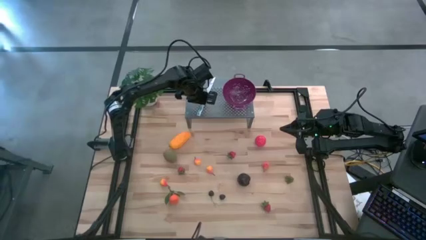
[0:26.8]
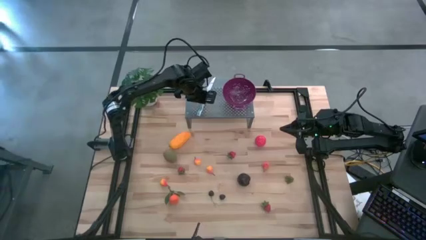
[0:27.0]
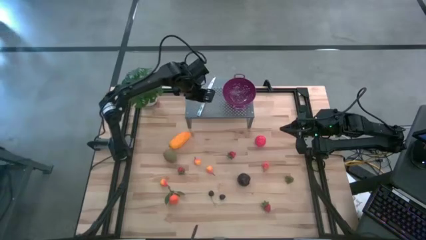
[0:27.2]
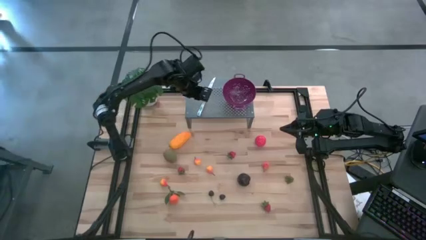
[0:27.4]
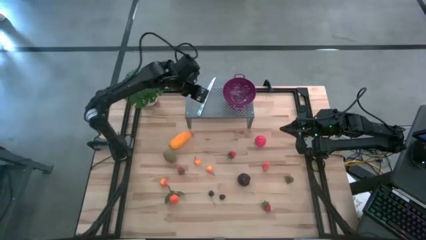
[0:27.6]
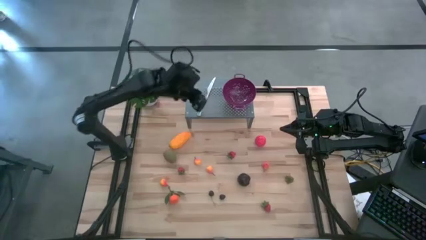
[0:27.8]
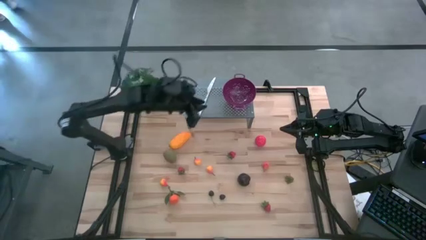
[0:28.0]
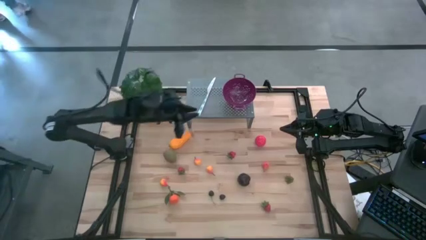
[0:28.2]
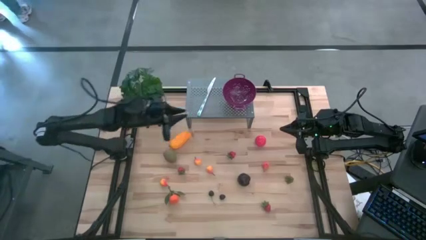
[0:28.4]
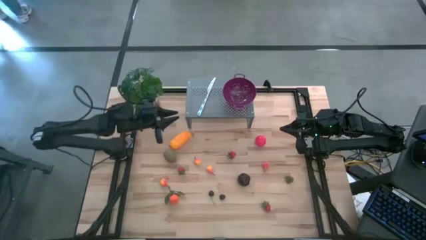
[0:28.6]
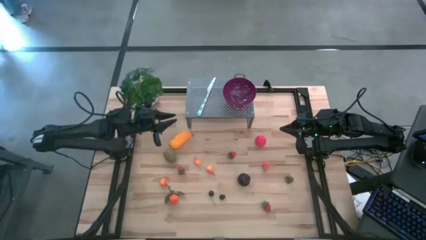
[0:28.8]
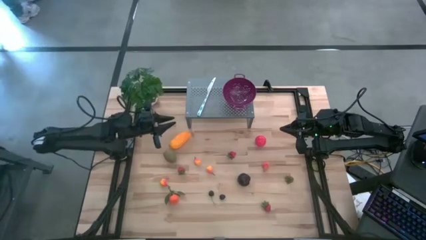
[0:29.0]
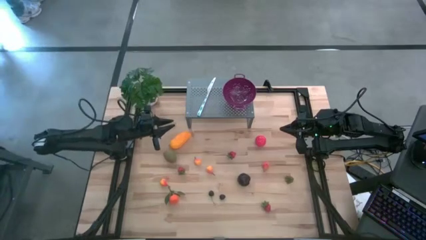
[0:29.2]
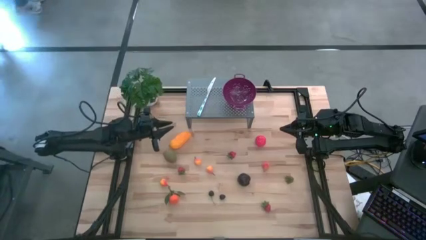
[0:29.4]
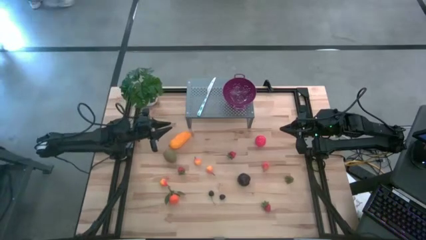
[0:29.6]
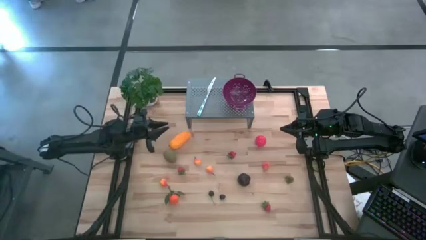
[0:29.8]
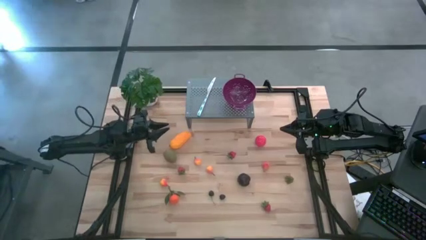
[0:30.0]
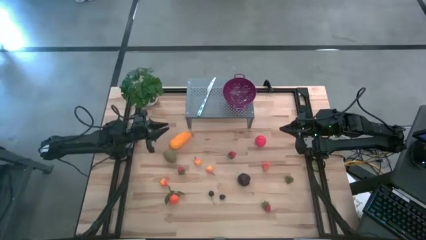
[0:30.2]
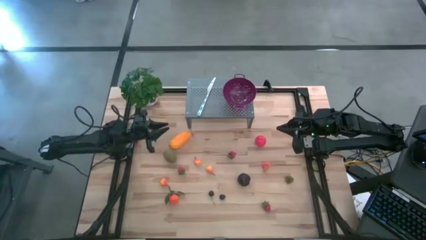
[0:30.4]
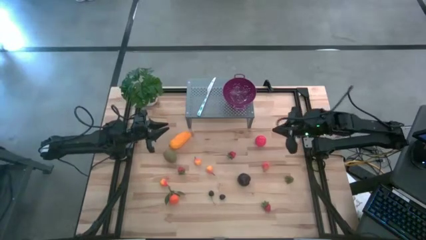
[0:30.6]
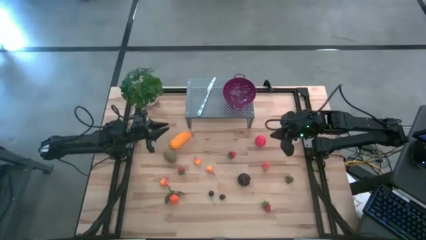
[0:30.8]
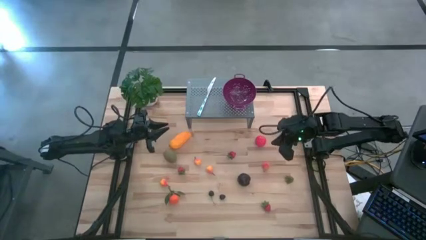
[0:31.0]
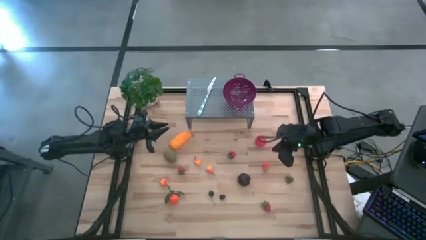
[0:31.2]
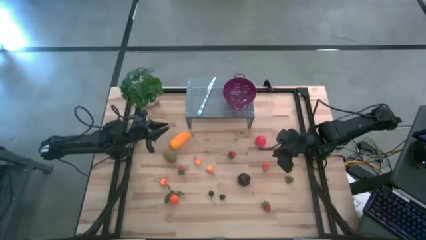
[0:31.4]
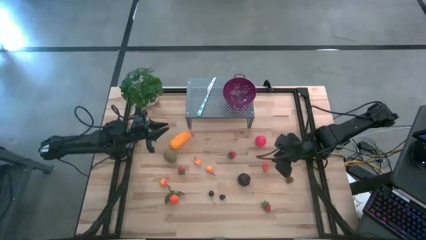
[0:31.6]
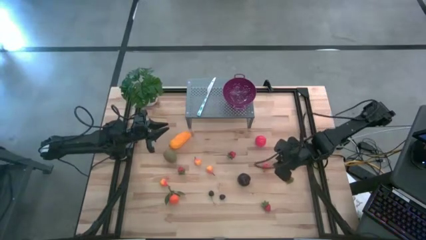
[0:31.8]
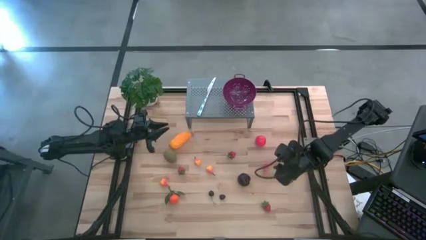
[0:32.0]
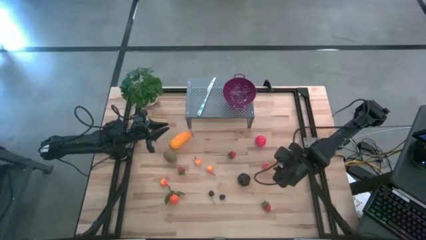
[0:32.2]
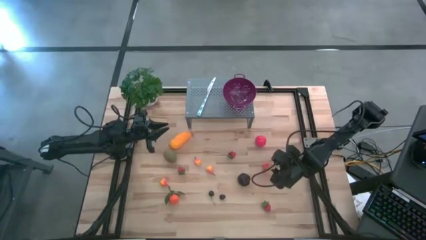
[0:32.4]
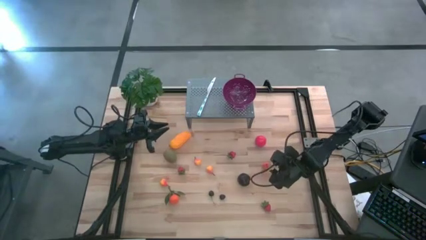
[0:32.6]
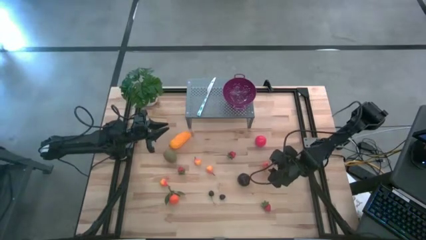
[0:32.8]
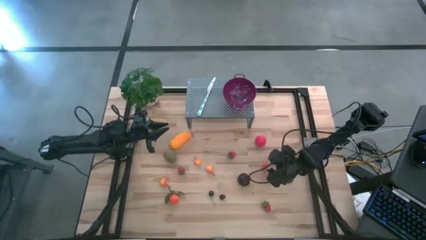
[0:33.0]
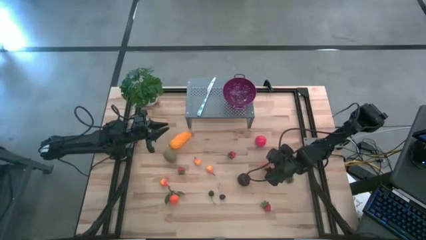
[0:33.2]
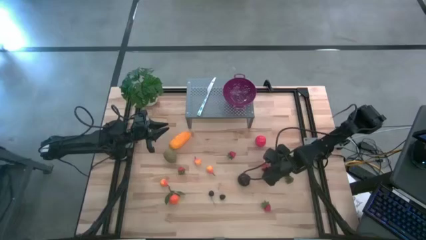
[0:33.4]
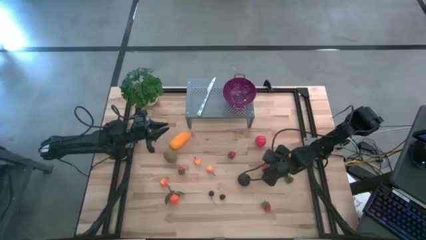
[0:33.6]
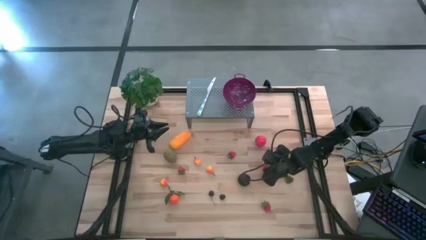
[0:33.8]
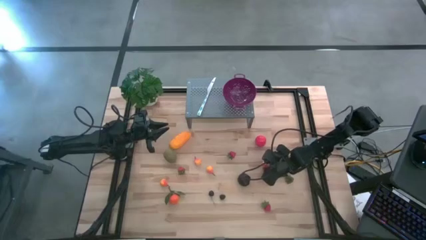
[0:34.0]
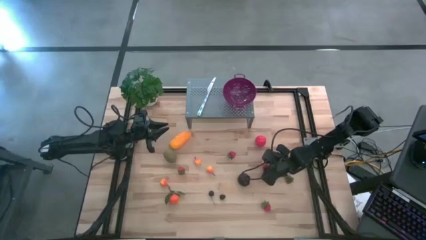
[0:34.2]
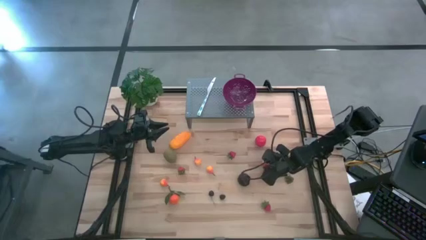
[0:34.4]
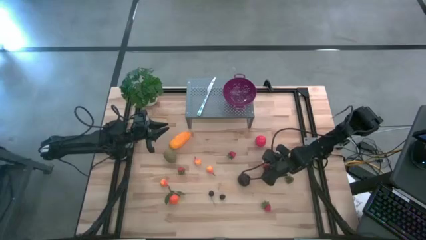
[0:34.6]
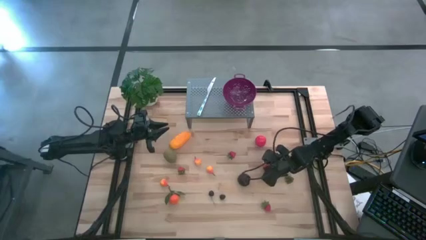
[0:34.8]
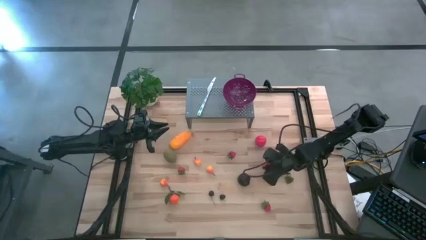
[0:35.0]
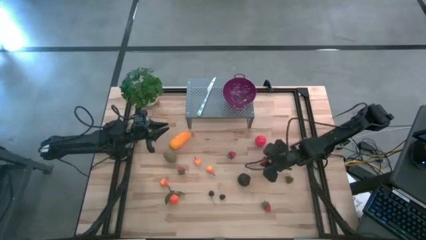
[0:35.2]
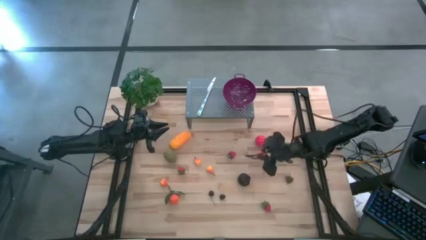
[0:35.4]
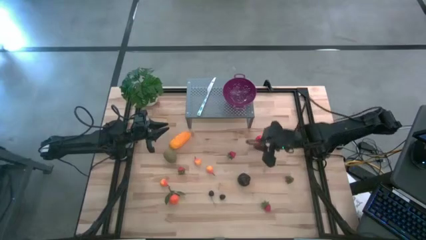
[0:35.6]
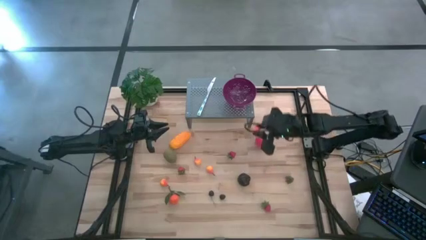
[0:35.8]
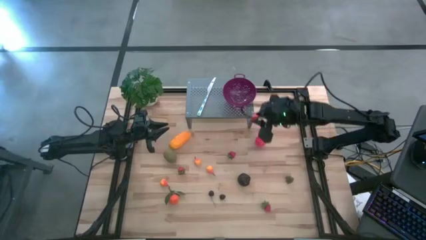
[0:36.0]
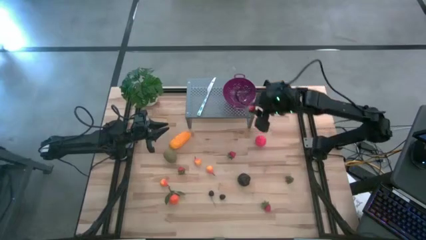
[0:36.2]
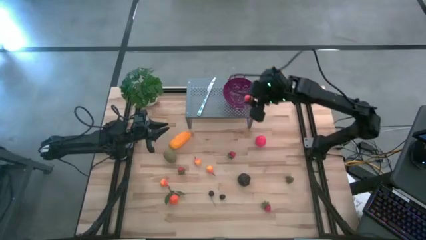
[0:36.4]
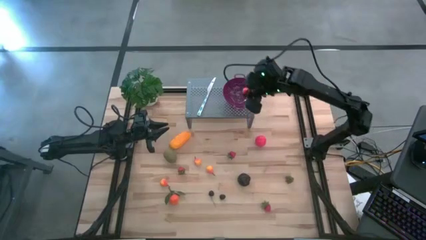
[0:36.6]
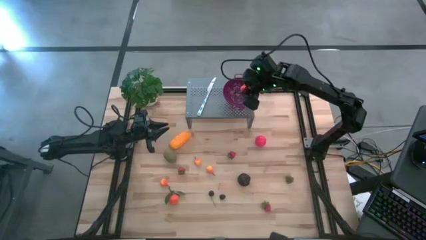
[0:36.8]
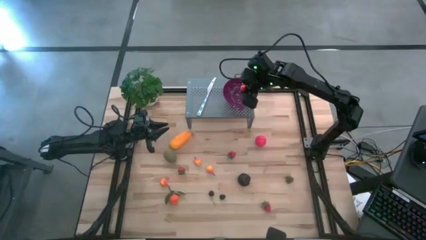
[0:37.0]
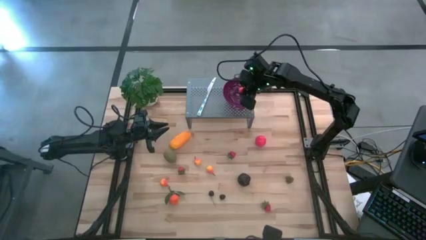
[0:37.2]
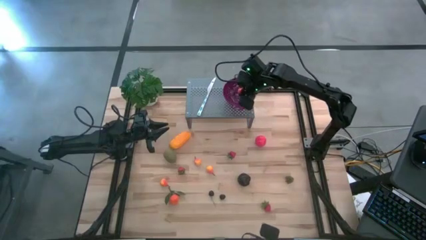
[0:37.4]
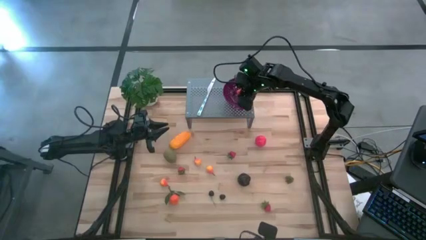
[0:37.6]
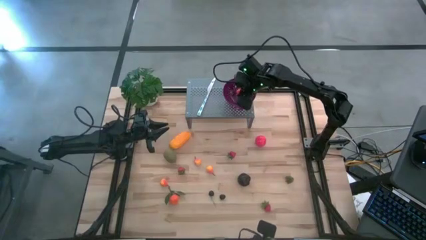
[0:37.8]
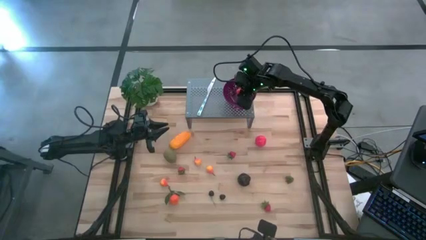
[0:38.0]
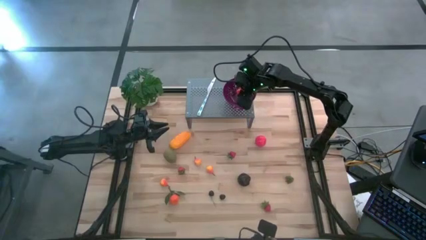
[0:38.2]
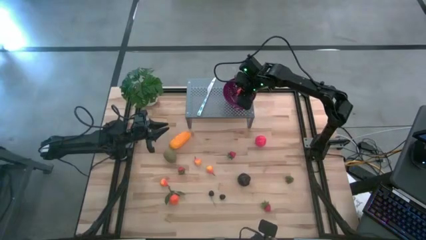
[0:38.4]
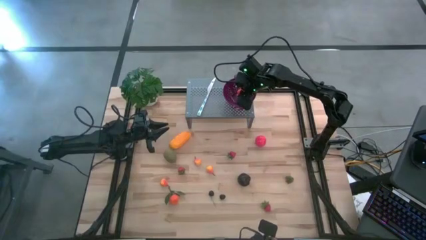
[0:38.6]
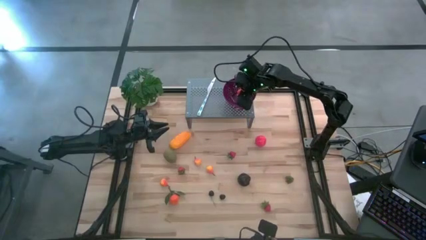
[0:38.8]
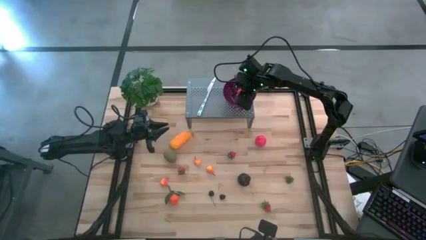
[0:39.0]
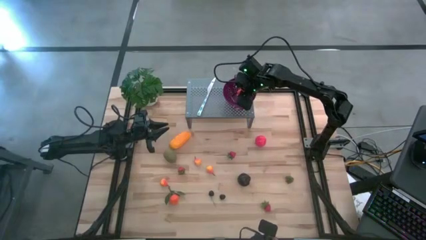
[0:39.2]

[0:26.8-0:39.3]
Task: Pick & Place Fruit
Put the orange pear into the violet strainer bowl on the shelf
